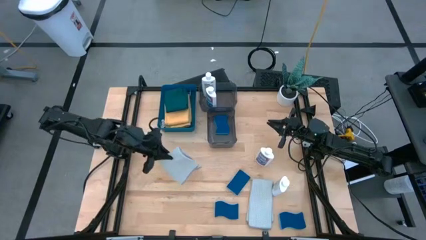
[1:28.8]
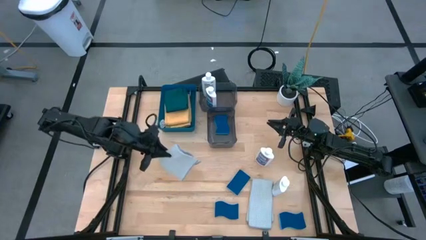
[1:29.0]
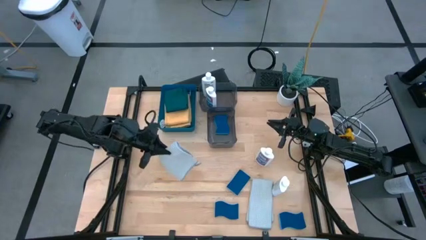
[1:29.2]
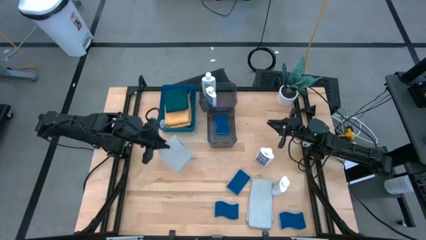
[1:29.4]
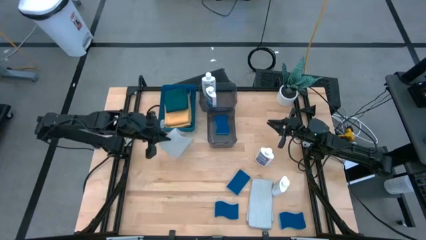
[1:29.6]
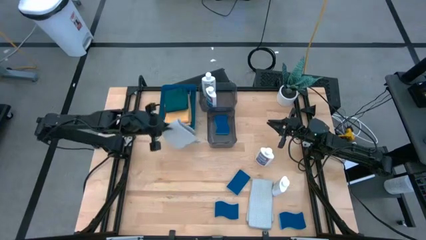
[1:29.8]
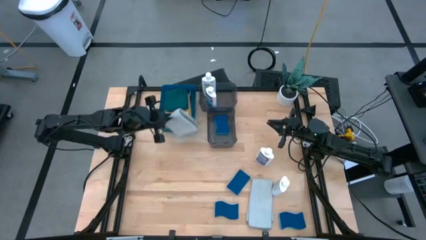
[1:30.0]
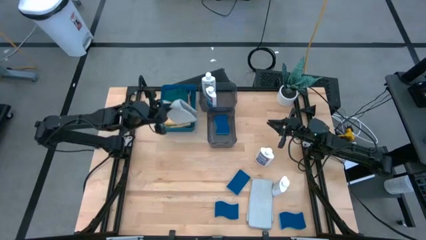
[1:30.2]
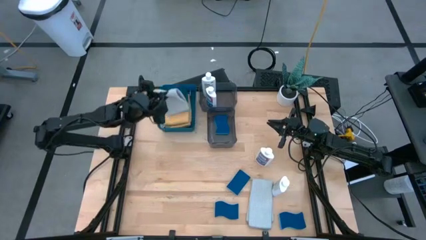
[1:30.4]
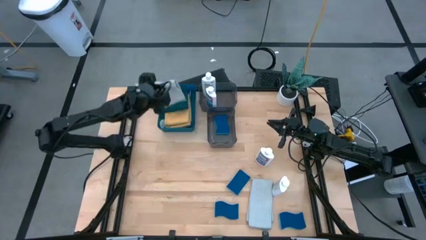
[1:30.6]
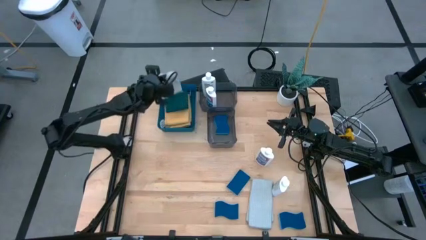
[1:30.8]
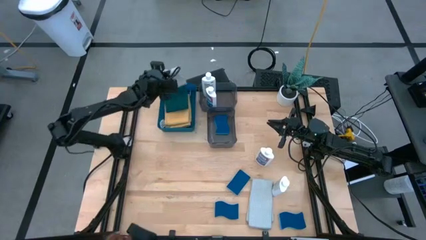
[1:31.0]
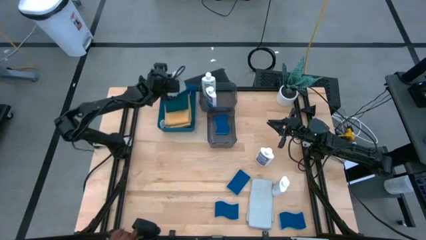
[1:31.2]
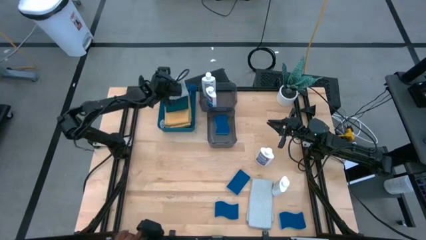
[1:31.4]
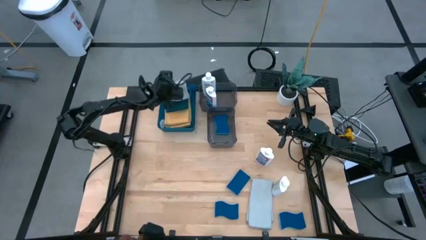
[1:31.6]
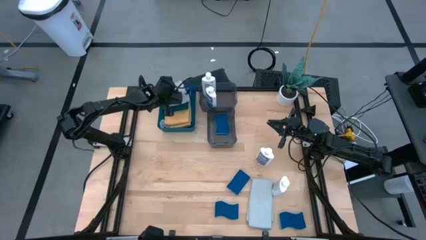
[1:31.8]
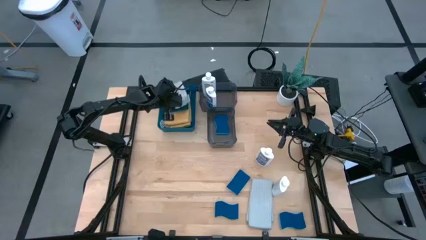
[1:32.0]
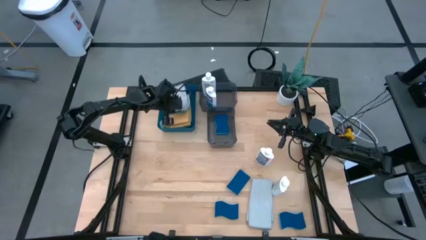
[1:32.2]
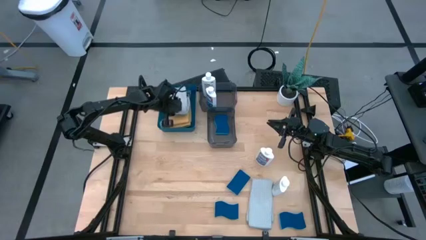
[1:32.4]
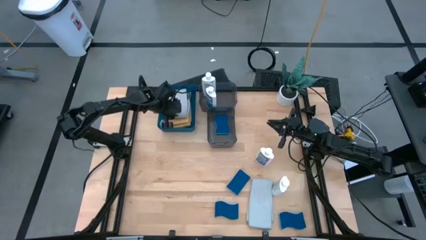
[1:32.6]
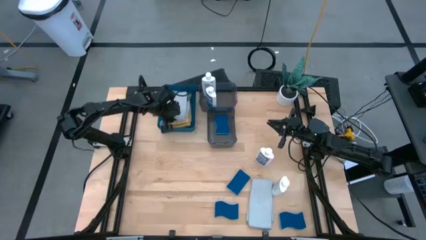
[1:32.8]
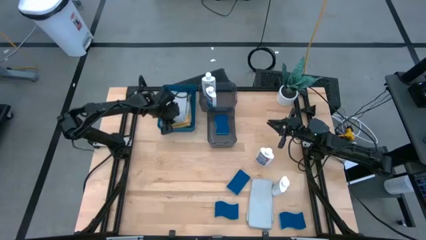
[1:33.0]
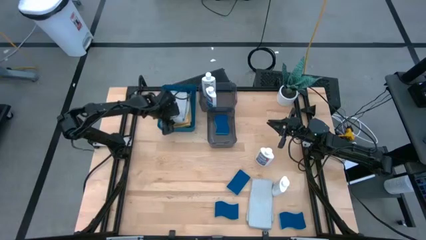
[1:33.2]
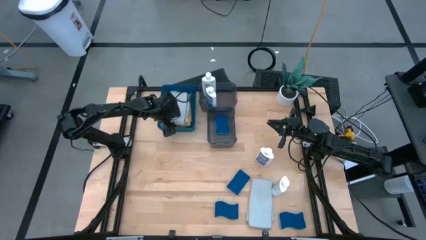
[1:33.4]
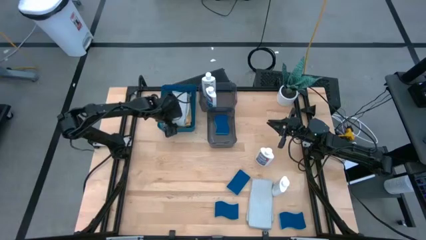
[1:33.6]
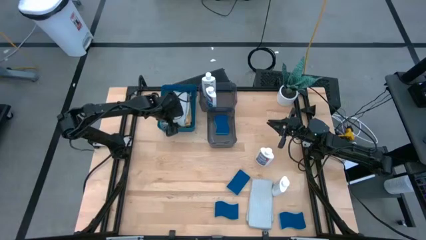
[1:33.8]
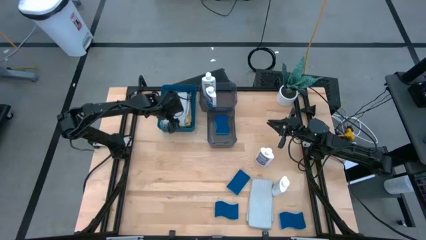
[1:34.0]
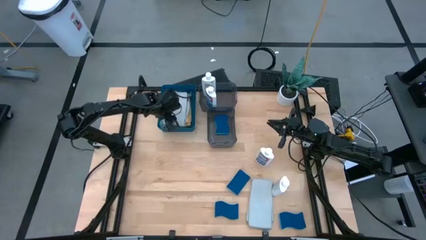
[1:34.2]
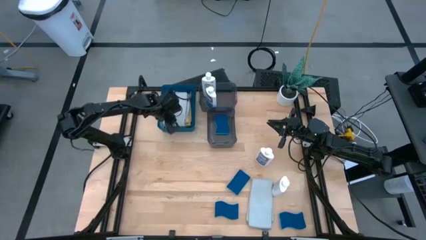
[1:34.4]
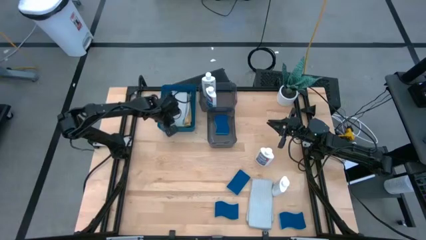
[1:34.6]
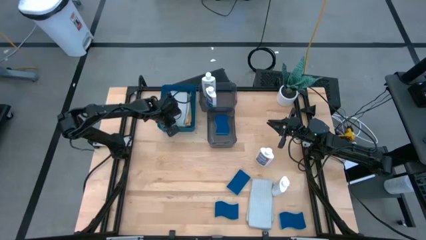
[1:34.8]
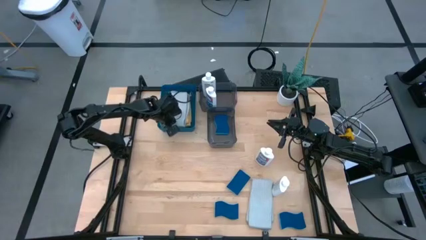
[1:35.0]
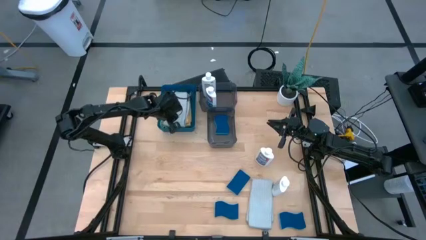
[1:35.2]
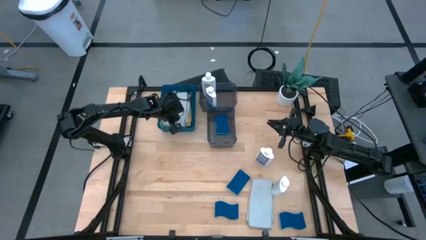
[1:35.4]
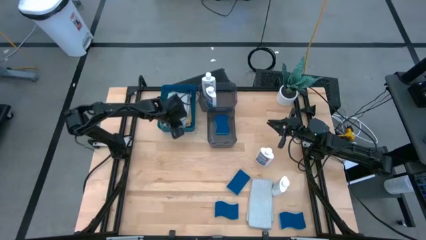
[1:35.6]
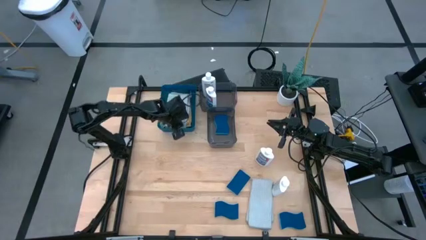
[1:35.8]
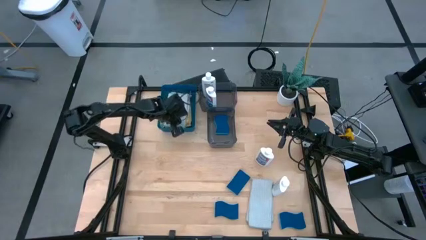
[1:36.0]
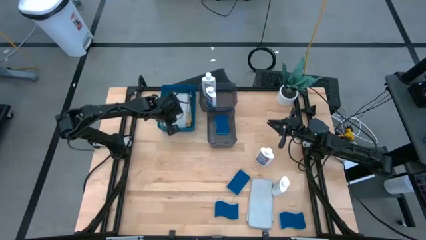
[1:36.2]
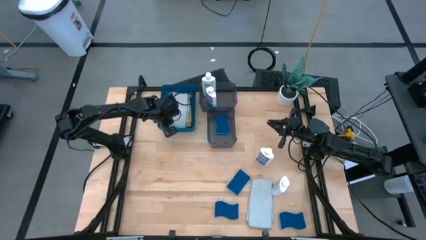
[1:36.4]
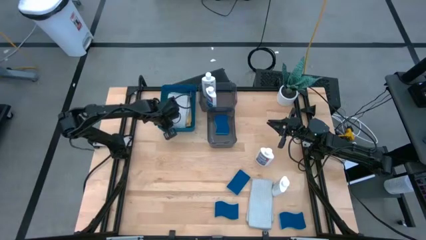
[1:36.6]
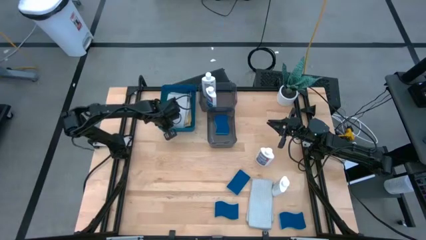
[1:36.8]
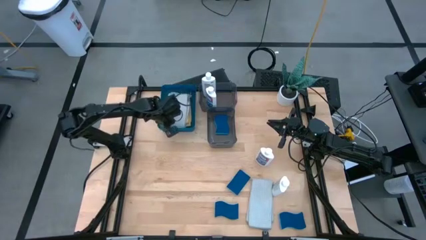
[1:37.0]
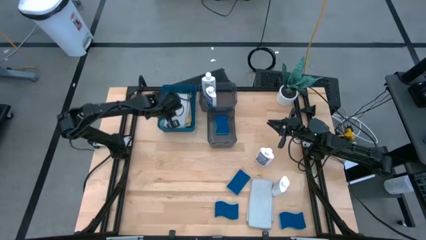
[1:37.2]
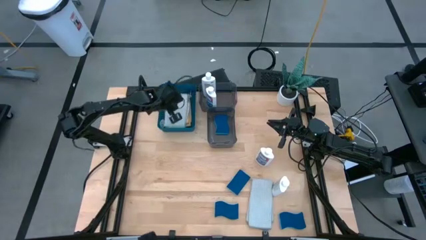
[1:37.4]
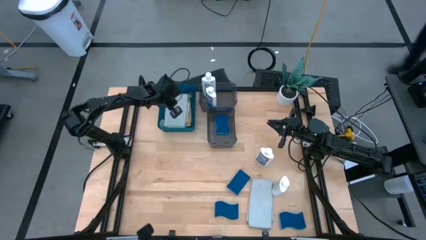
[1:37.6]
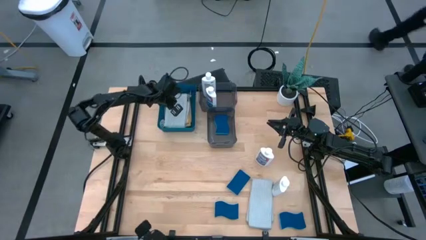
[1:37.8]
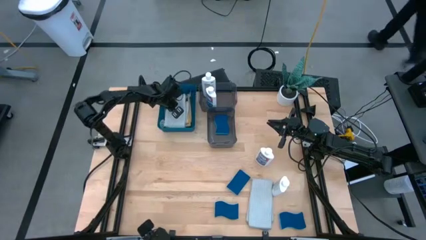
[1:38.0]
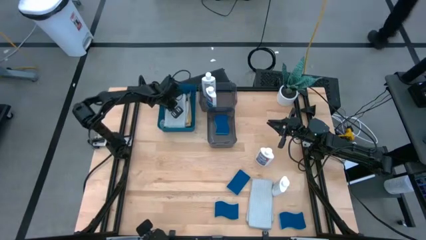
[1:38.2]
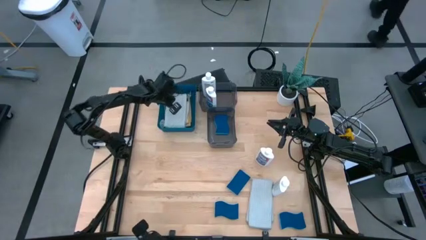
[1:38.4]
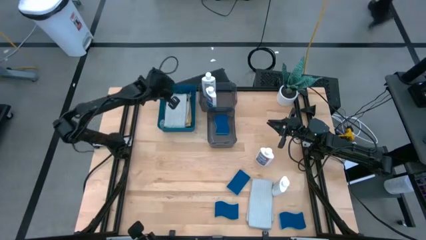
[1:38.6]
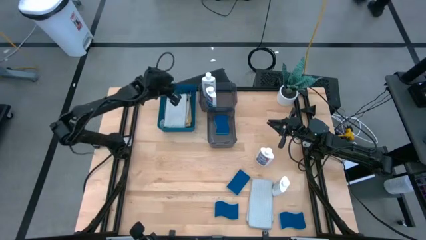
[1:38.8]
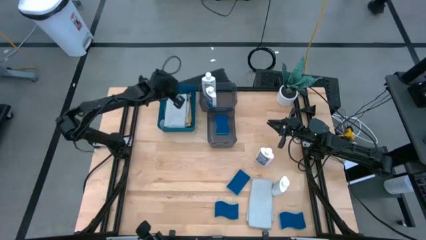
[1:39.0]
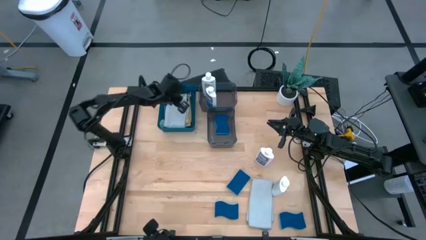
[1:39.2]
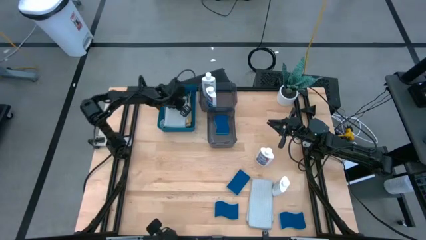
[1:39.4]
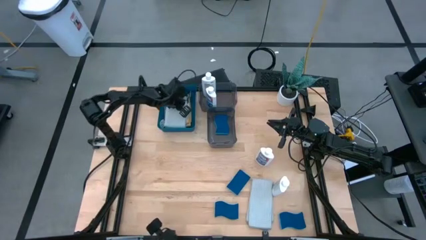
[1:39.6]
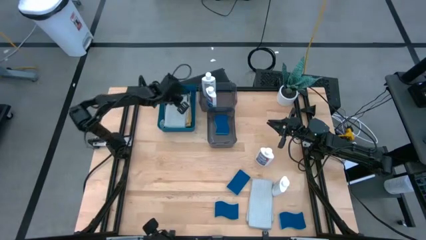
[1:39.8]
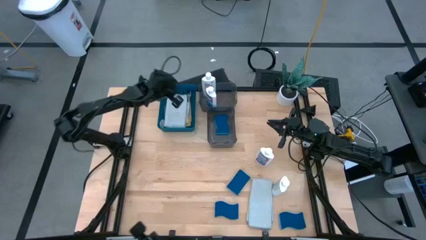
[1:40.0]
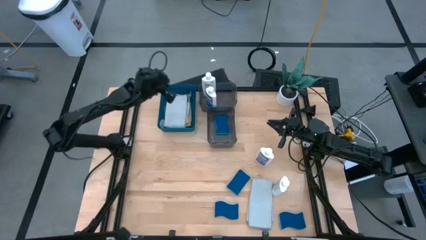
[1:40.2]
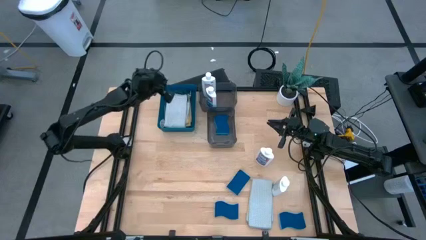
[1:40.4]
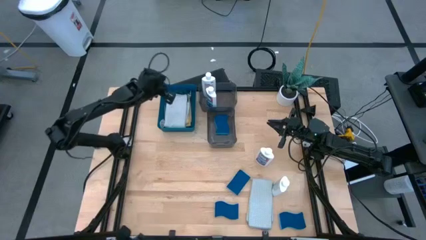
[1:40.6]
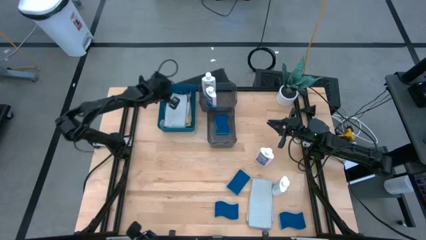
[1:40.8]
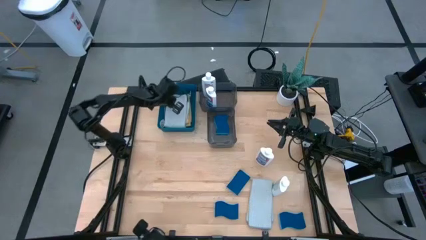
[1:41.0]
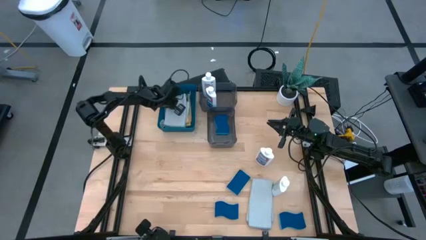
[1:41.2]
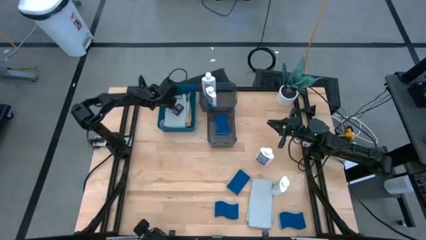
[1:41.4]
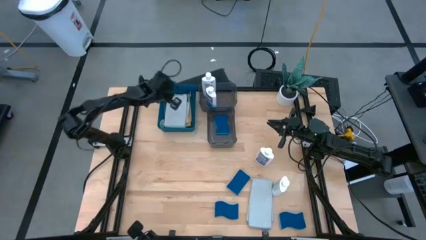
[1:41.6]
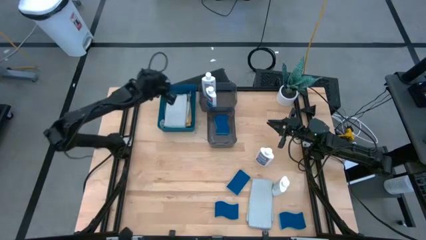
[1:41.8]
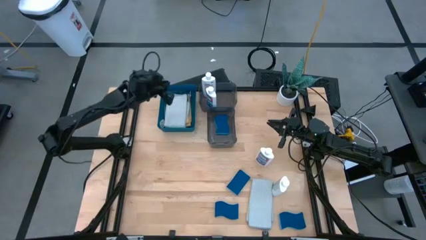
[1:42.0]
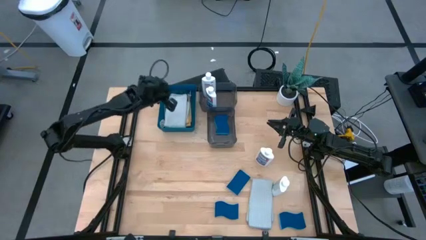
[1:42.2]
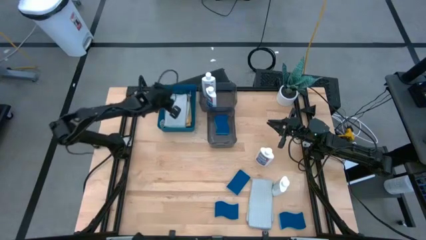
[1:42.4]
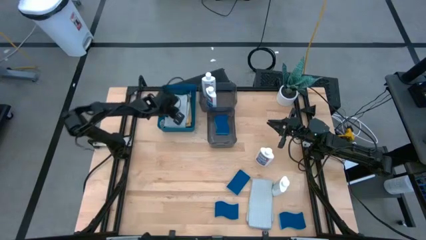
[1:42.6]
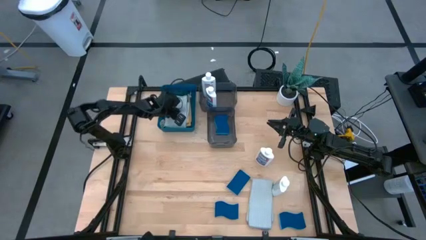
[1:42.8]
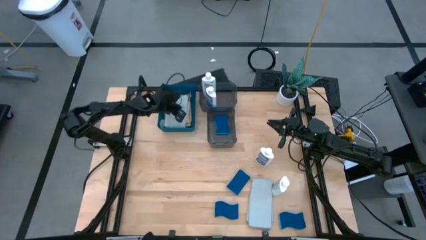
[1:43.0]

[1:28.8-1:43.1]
Task: Pick & Place Kitchen Items
Put the left gray microfiber towel into the blue bin

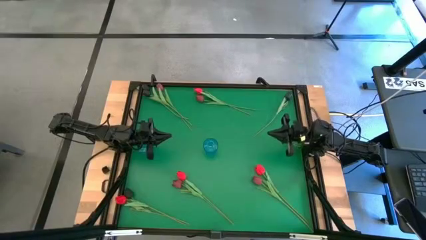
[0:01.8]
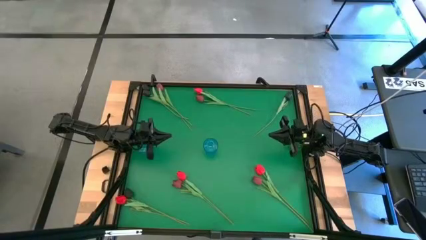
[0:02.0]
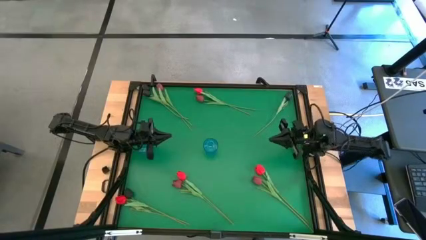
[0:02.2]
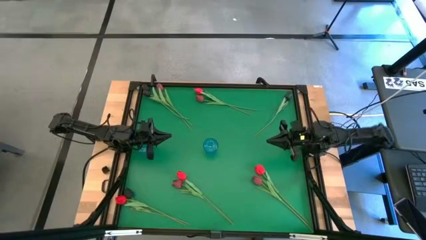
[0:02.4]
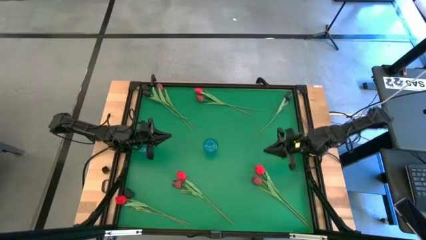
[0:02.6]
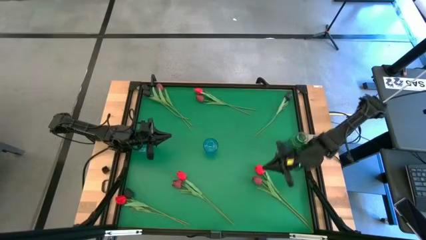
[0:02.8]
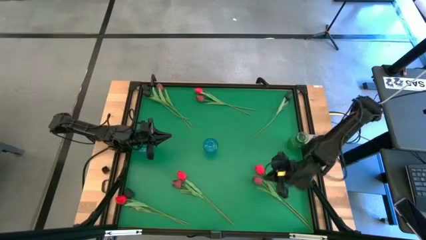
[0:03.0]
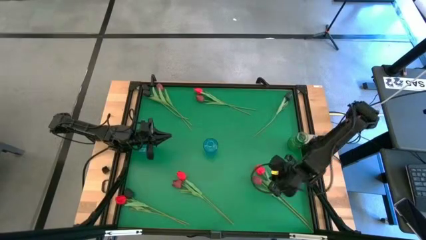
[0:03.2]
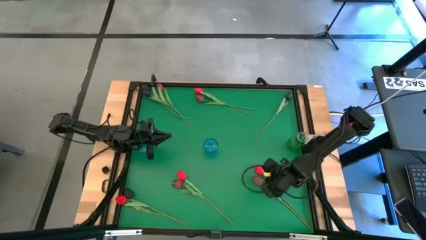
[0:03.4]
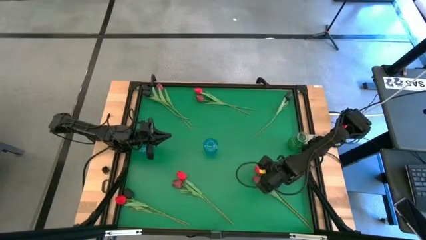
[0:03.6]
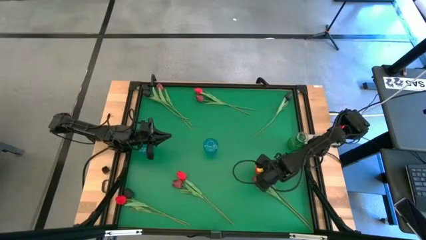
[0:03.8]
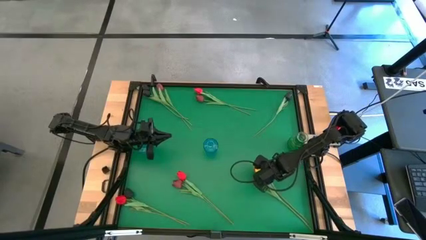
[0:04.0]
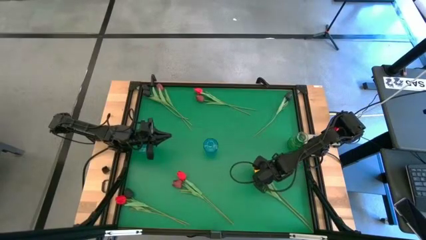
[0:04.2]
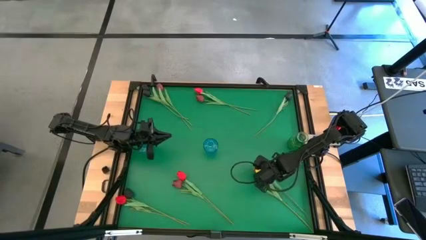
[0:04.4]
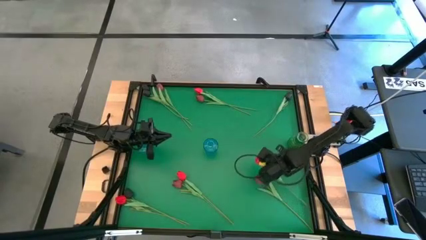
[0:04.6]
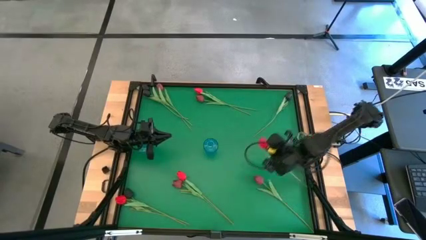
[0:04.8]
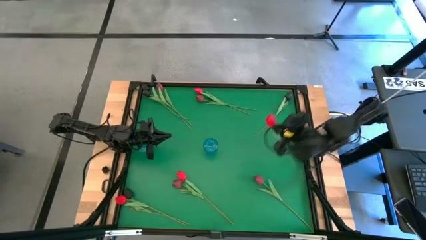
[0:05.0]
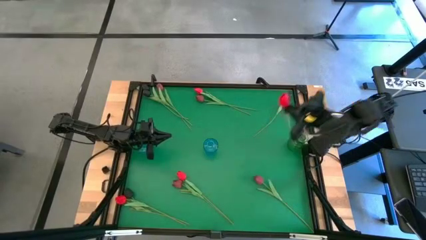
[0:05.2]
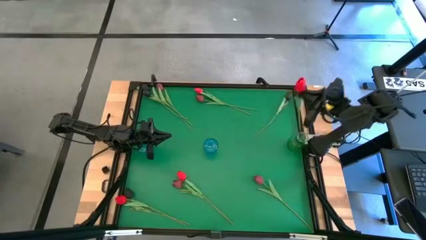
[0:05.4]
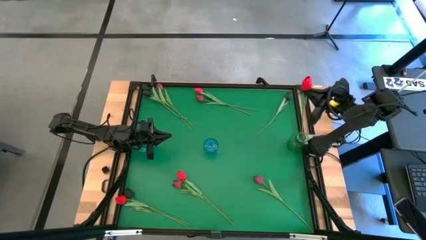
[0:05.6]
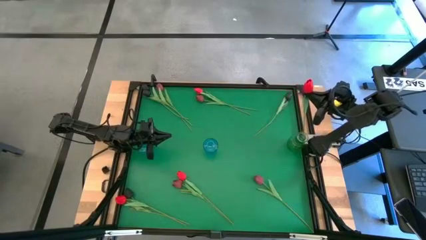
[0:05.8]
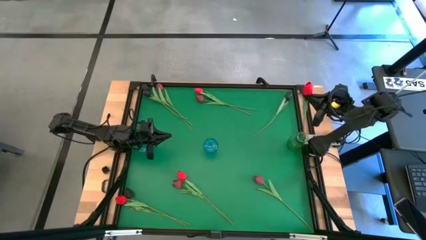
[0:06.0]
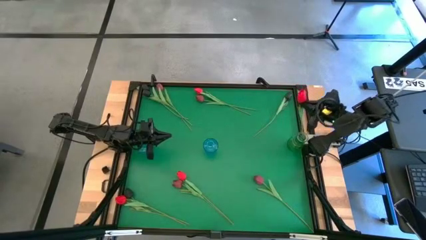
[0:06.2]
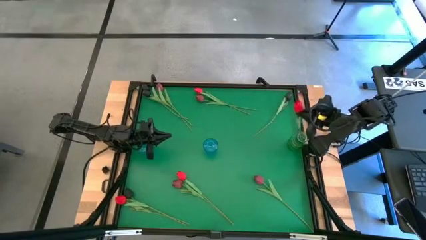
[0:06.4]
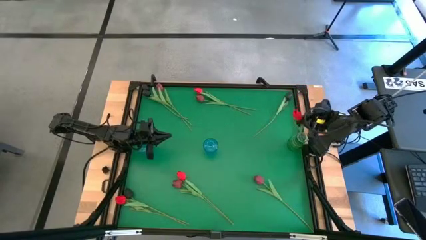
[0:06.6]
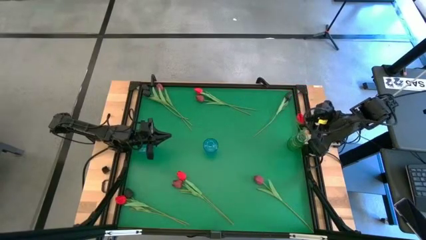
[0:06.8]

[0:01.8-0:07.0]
Task: Sort flowers into vase by color
Put the pink flower into the green flower vase
